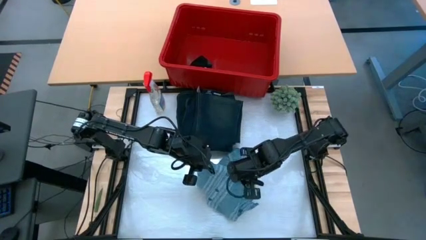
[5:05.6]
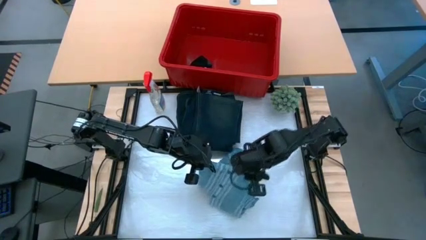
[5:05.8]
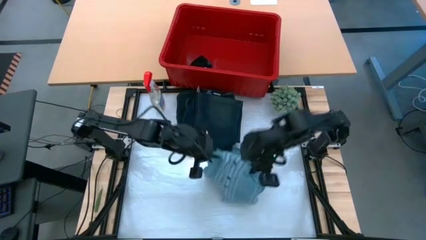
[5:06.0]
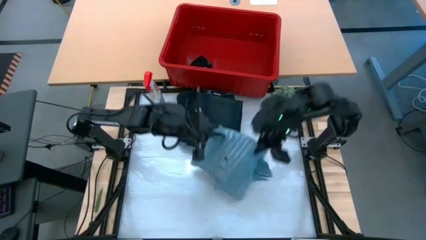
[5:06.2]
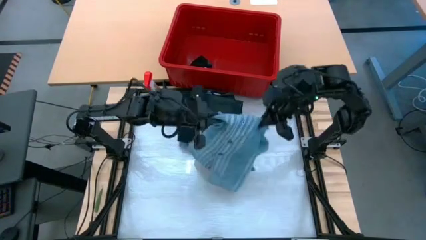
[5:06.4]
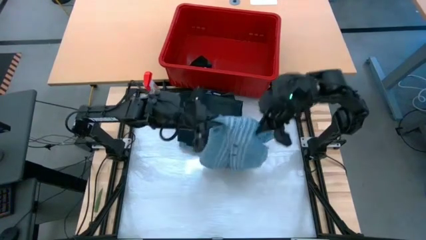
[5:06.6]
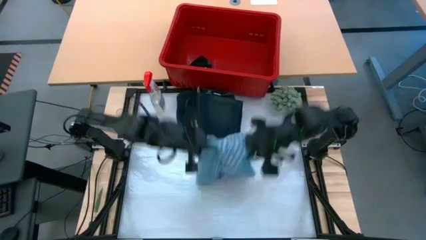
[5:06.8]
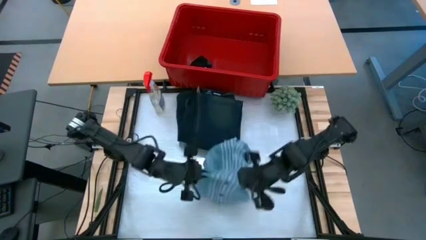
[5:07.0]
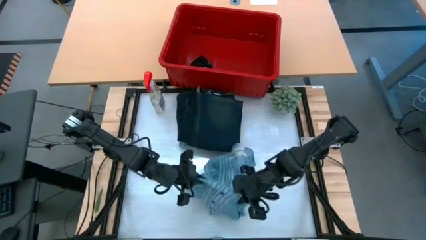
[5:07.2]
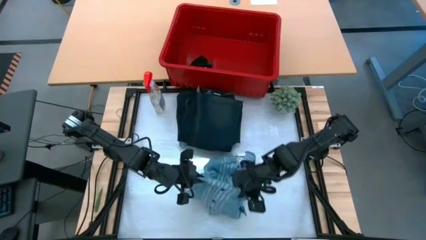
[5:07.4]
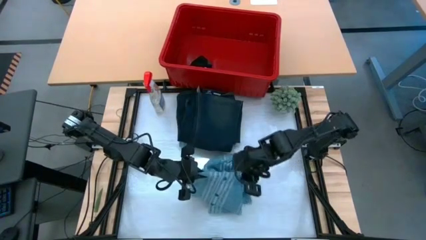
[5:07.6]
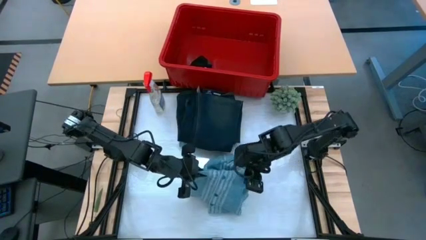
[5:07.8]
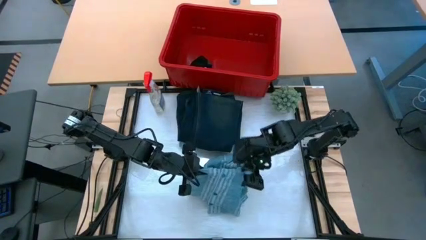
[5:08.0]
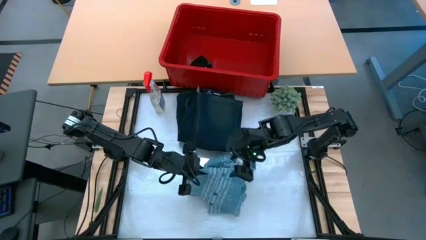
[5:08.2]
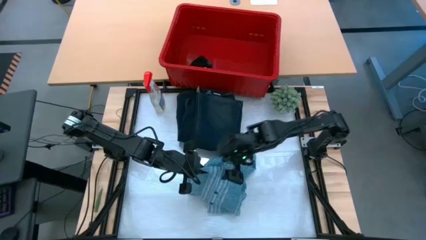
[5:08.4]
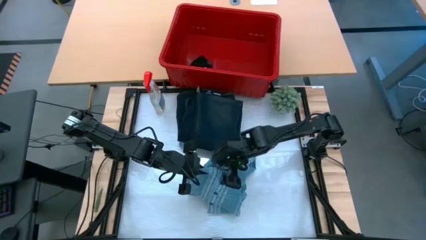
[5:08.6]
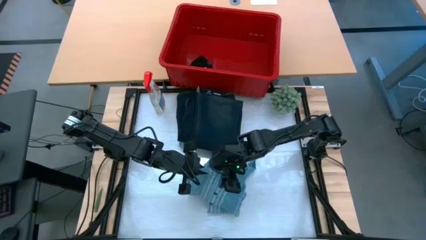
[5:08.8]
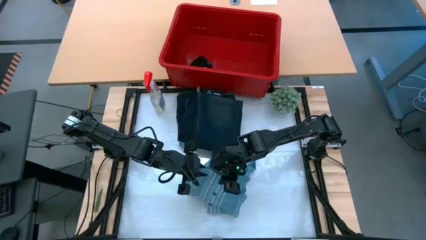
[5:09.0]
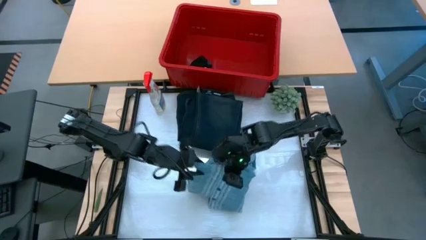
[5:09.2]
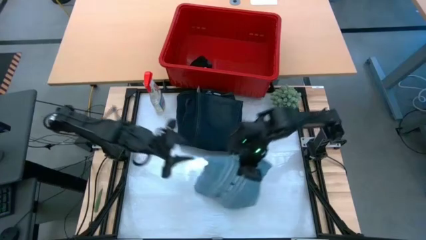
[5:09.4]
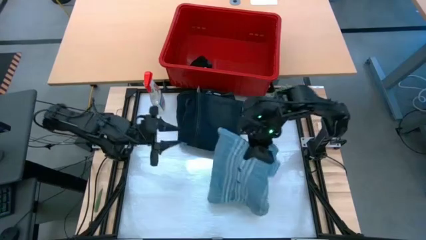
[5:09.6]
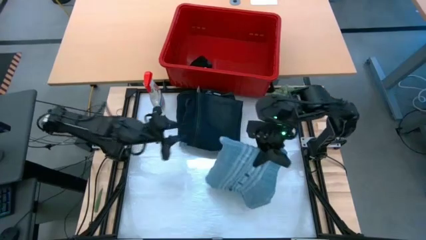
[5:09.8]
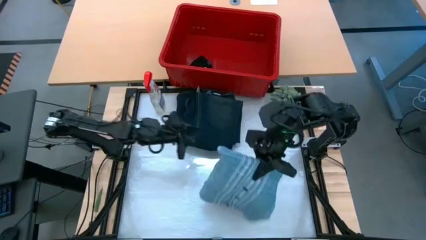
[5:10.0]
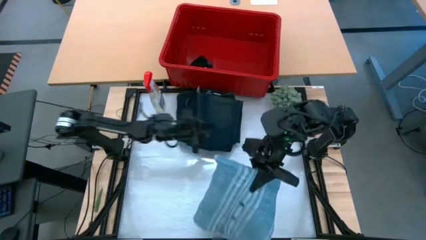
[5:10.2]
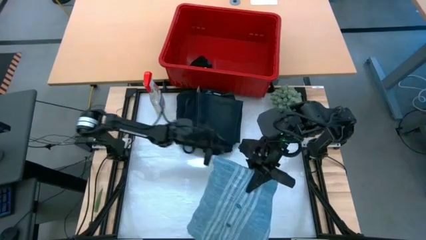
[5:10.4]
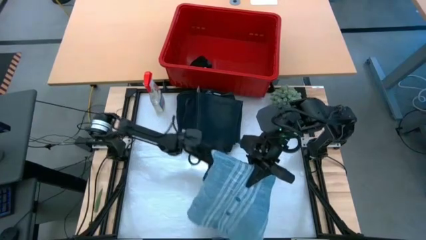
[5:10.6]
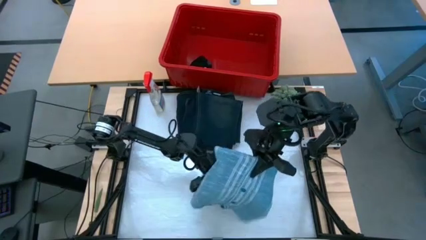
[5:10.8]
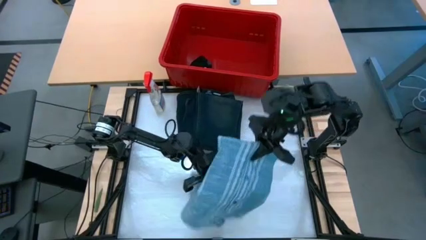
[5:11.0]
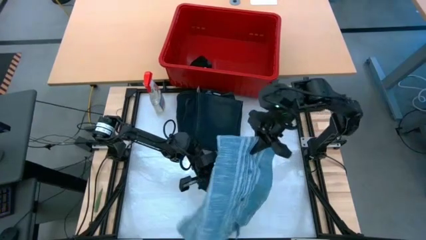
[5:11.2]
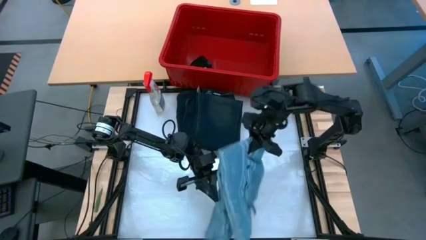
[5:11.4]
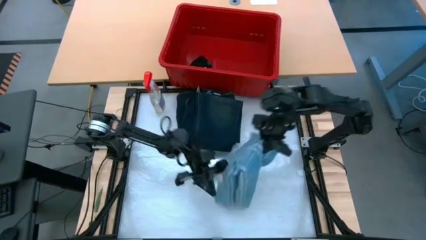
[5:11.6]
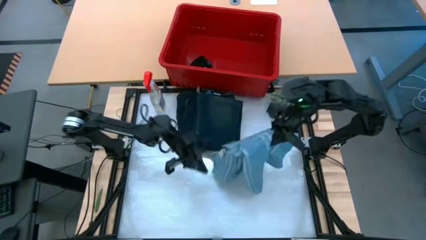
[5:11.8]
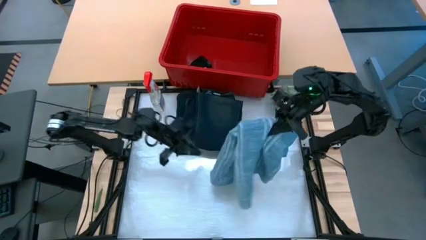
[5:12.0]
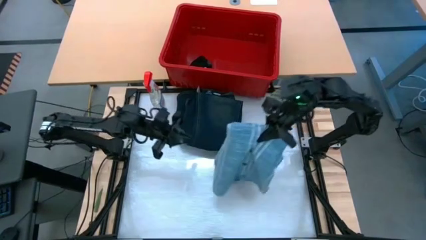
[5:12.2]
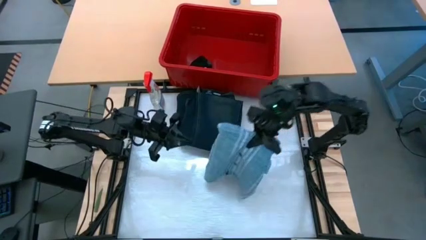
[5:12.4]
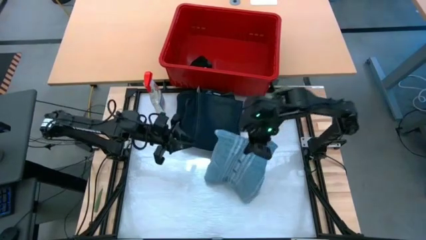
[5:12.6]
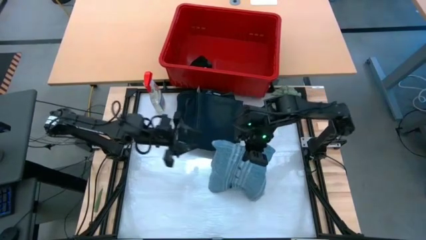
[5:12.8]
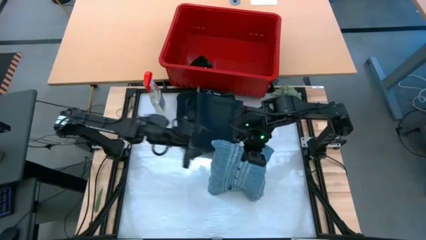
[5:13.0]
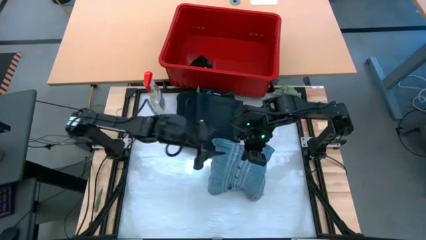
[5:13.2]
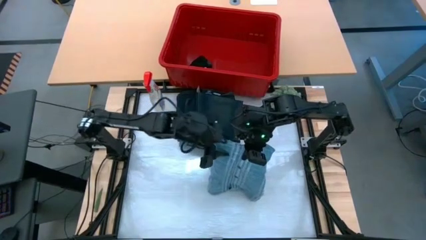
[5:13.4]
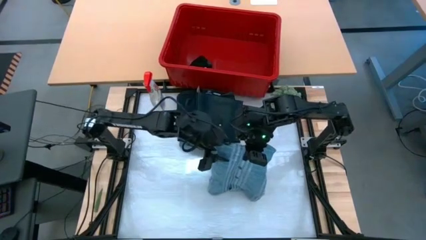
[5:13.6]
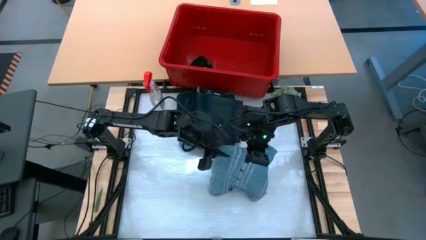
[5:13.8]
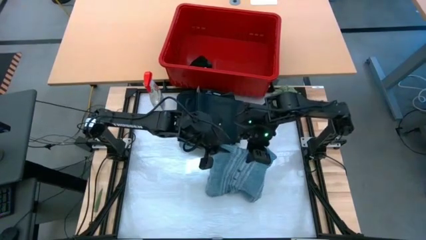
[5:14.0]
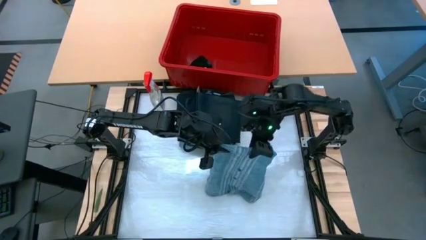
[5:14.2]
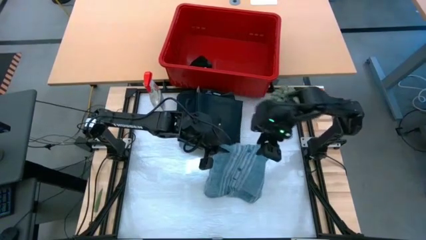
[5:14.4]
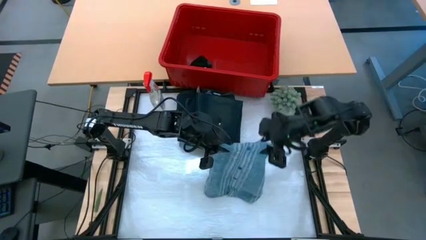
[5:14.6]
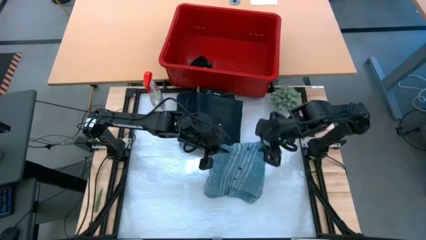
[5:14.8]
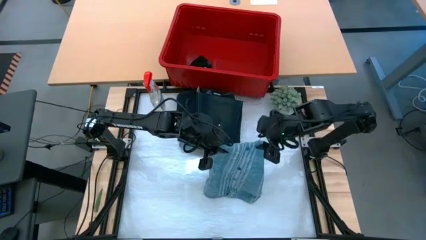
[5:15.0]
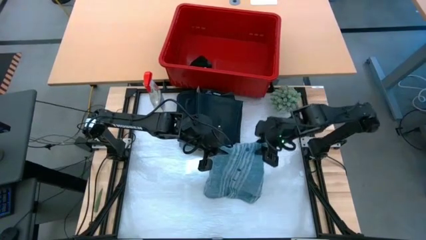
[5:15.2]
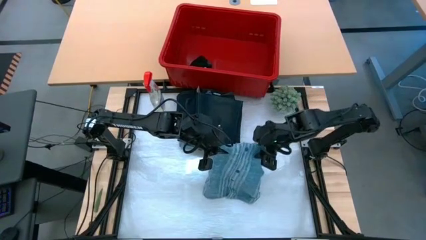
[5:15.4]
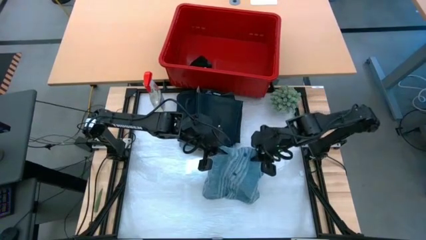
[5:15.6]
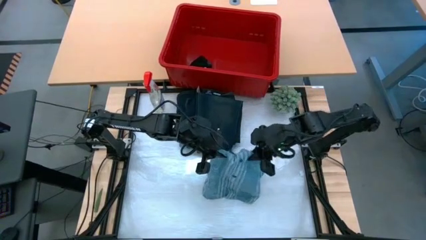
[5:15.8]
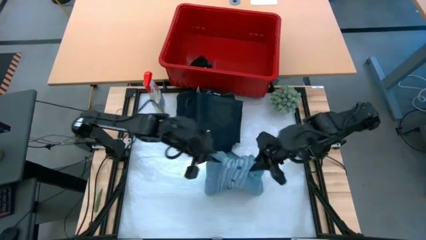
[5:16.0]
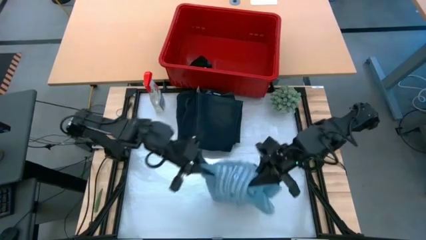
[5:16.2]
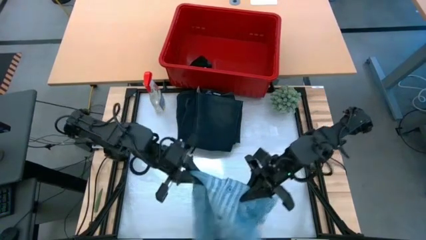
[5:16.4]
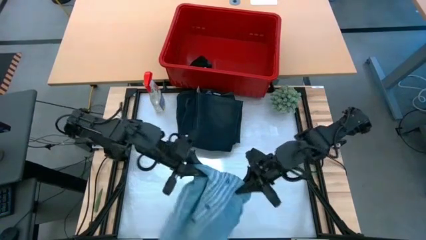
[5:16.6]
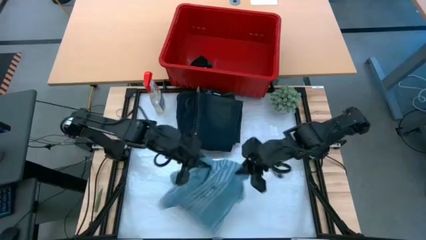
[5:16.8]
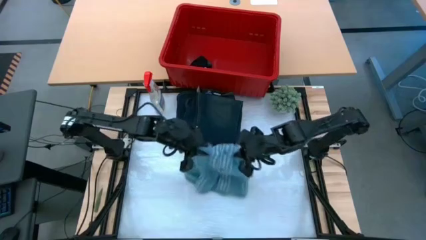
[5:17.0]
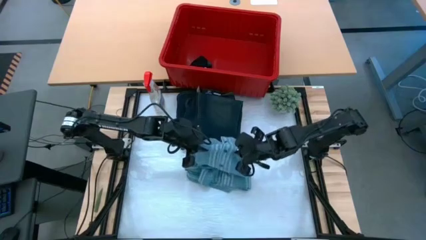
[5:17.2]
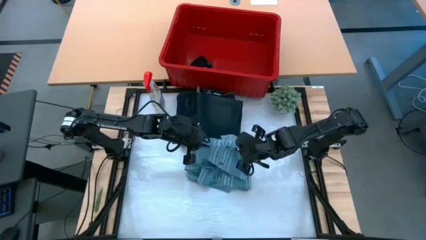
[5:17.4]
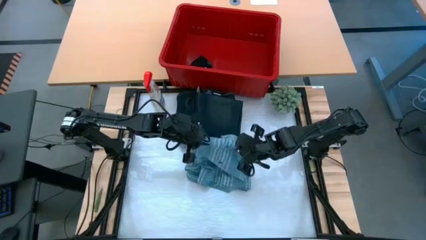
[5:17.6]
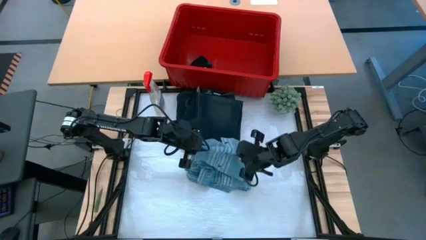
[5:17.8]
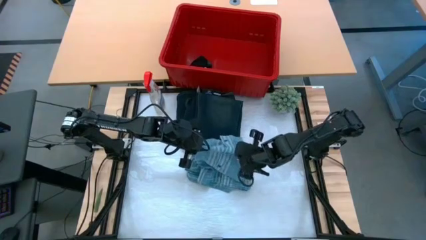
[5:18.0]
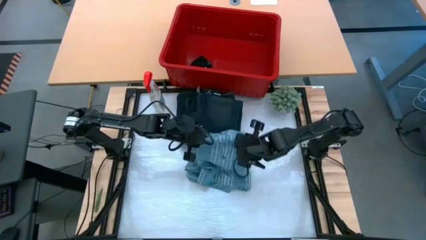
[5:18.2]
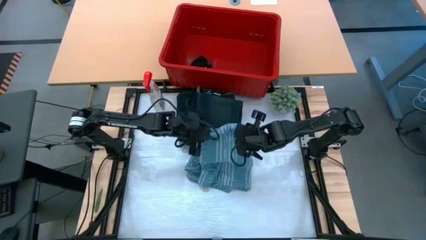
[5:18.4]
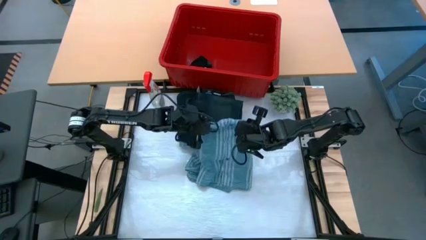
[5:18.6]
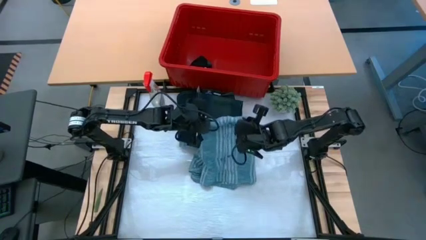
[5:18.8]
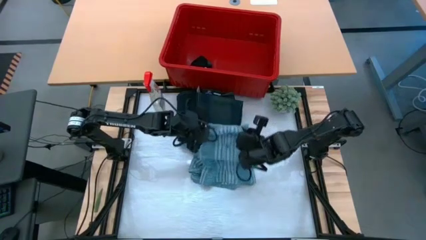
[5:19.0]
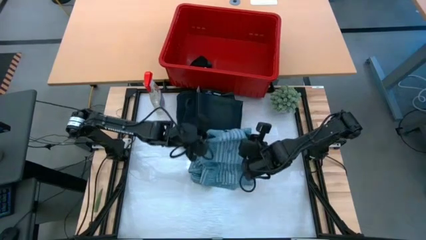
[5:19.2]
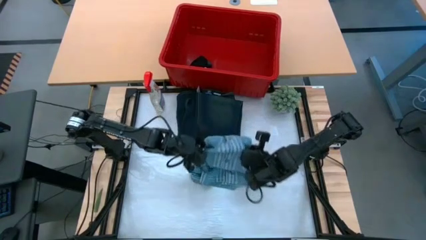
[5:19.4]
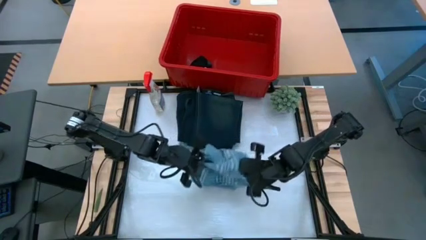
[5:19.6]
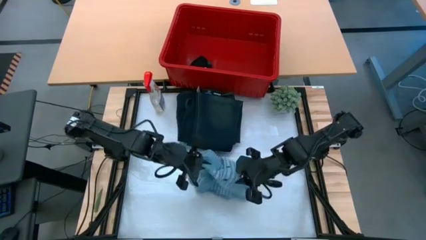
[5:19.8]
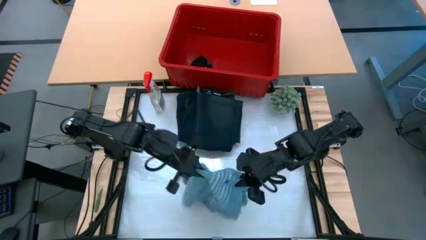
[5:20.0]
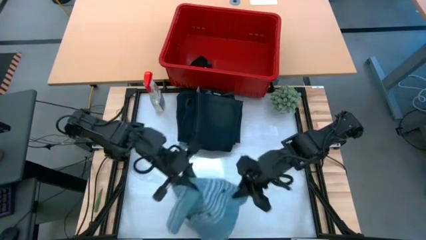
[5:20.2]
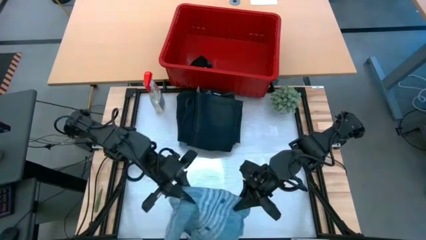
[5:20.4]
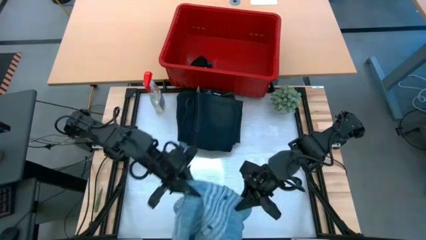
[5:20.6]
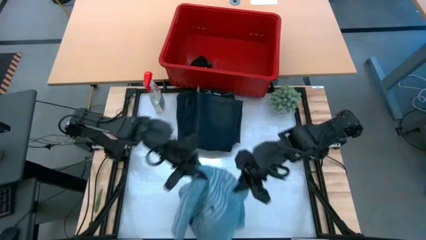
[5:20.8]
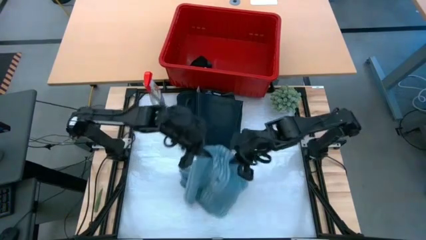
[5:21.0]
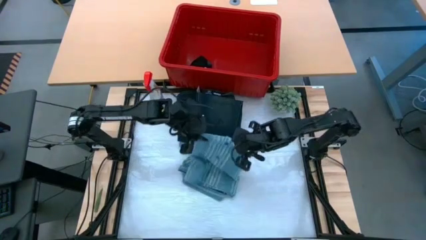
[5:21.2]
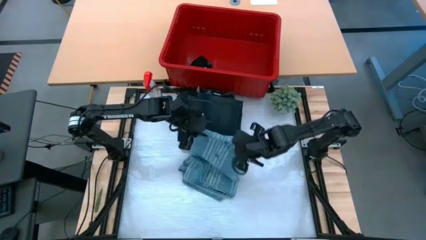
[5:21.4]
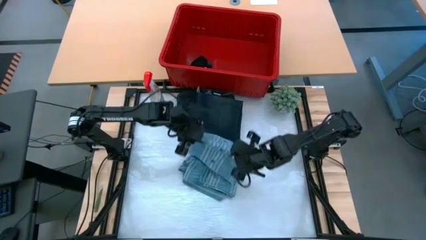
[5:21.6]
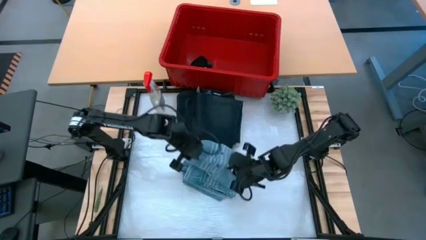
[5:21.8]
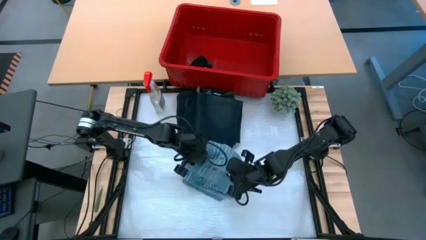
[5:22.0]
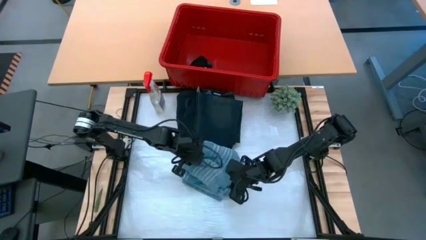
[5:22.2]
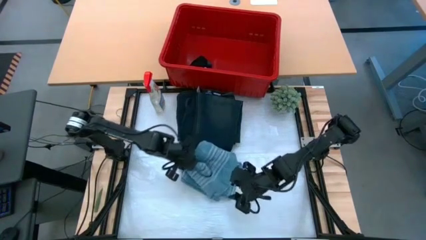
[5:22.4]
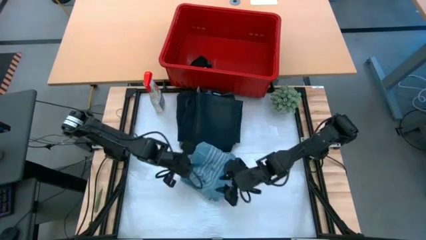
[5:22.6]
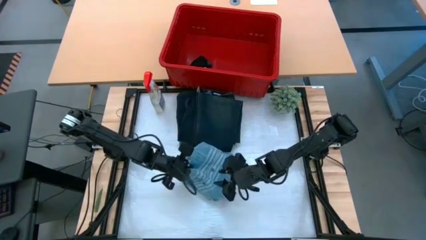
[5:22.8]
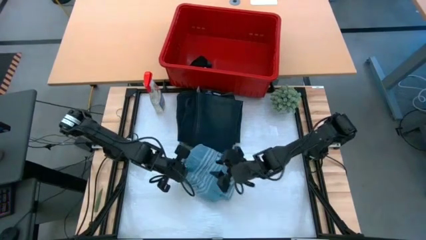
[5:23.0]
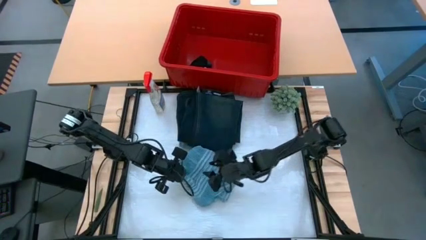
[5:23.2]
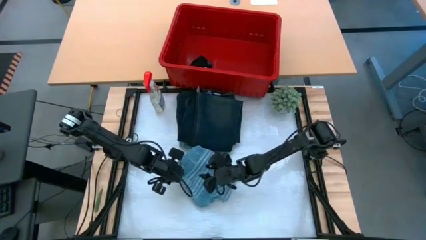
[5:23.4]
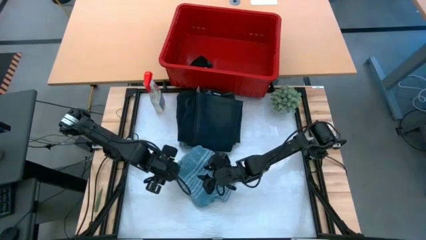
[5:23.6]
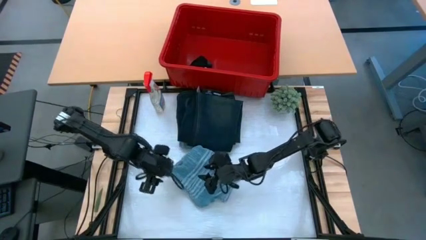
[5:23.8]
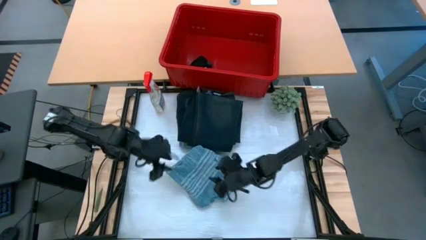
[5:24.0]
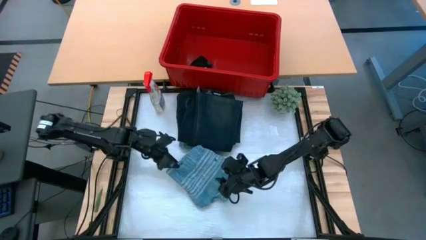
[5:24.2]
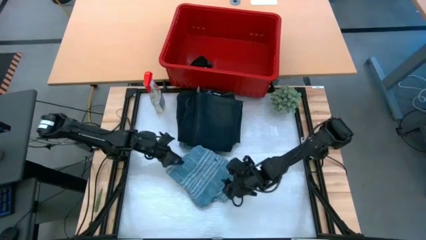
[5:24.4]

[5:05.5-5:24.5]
Task: Fold Laundry from Bin
Fold the blue long sleeve on the table
